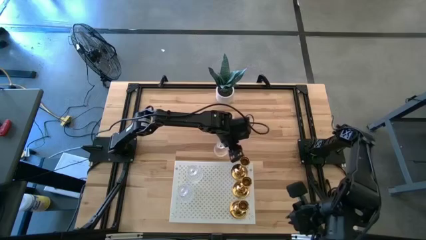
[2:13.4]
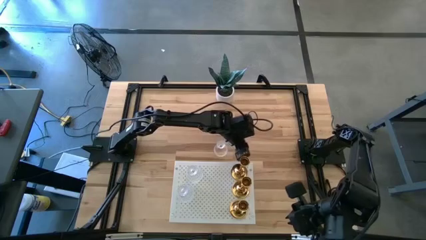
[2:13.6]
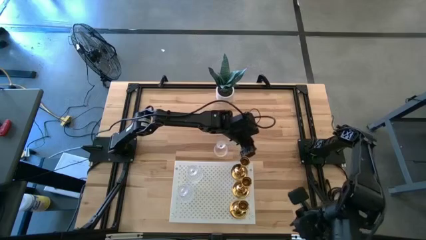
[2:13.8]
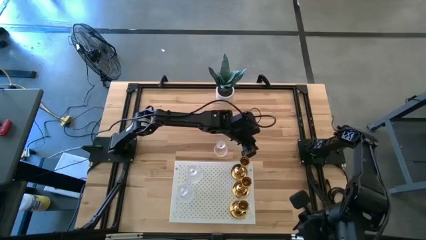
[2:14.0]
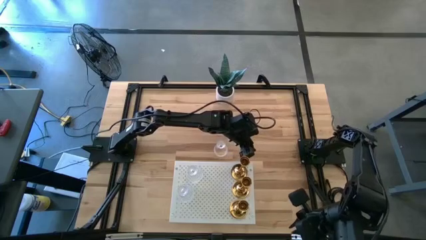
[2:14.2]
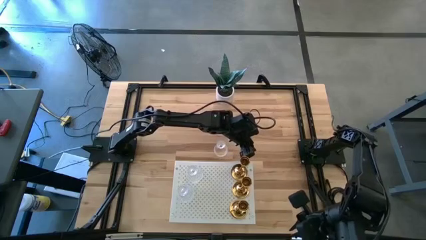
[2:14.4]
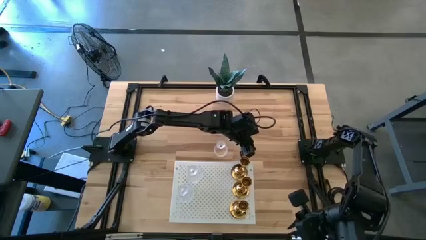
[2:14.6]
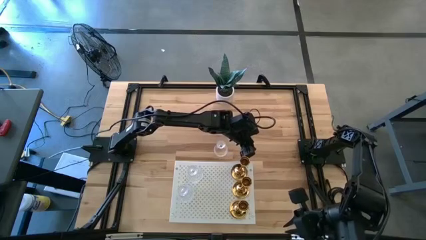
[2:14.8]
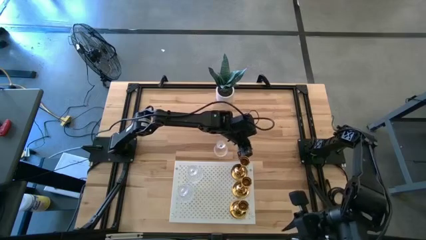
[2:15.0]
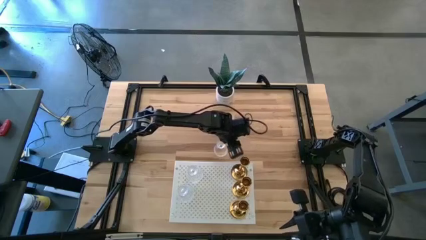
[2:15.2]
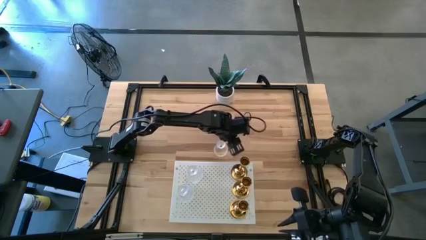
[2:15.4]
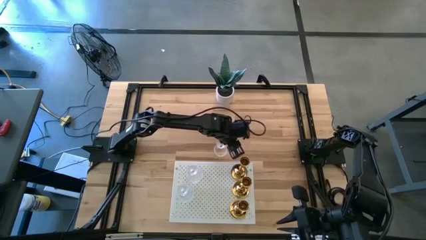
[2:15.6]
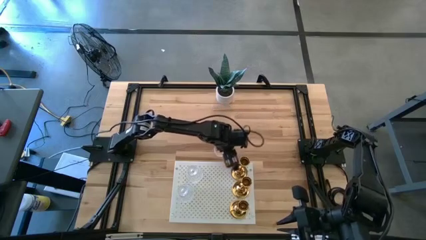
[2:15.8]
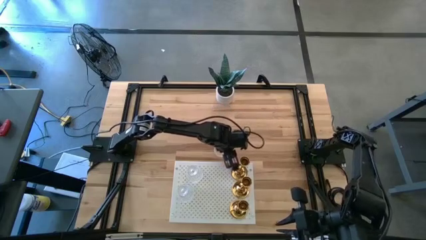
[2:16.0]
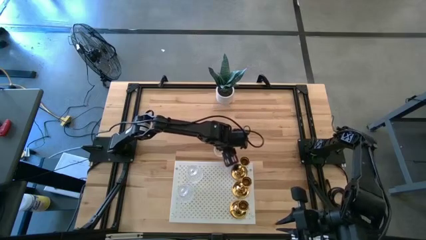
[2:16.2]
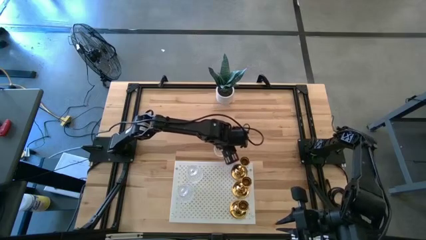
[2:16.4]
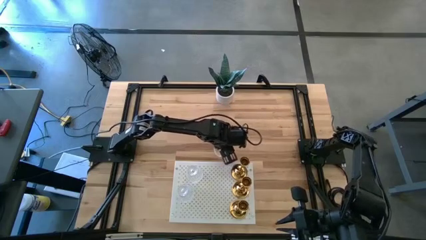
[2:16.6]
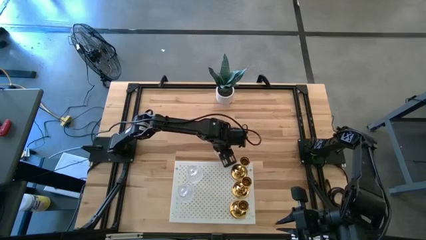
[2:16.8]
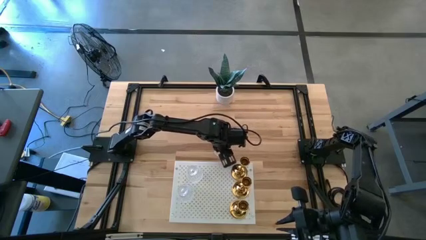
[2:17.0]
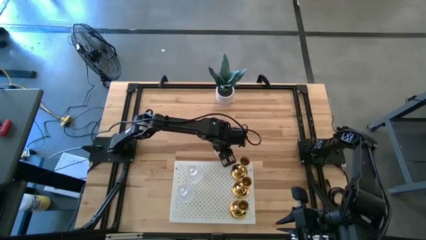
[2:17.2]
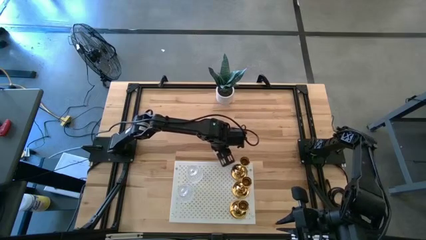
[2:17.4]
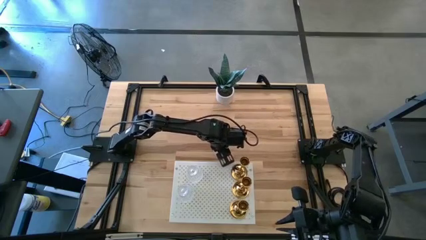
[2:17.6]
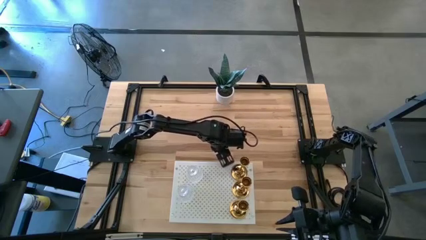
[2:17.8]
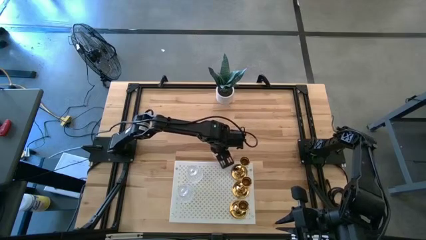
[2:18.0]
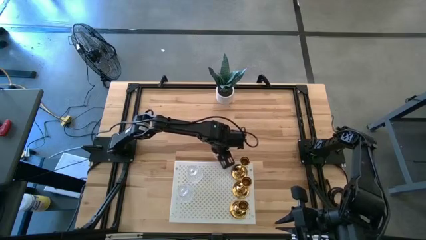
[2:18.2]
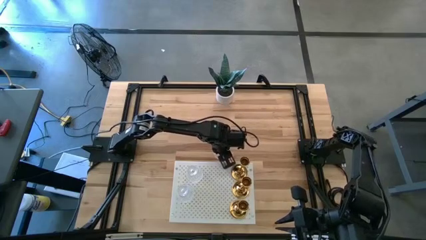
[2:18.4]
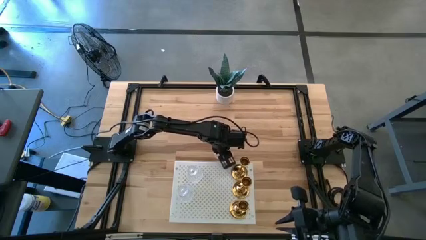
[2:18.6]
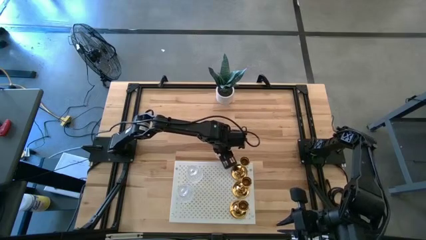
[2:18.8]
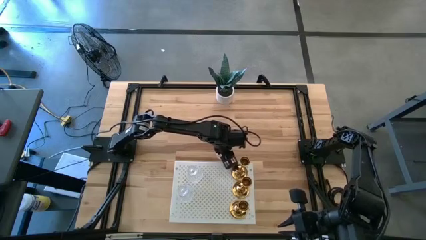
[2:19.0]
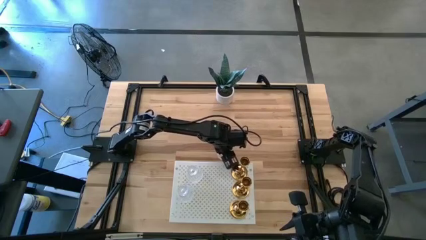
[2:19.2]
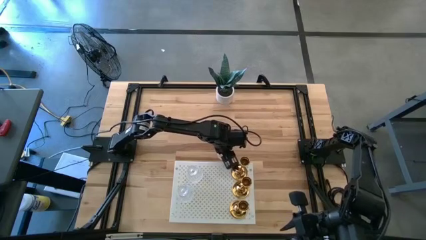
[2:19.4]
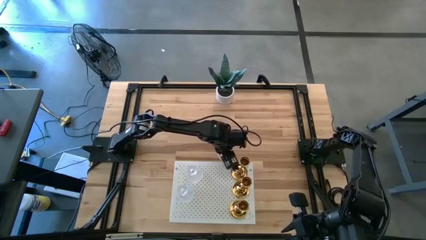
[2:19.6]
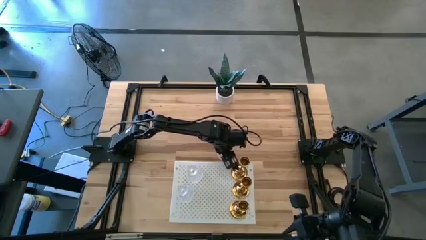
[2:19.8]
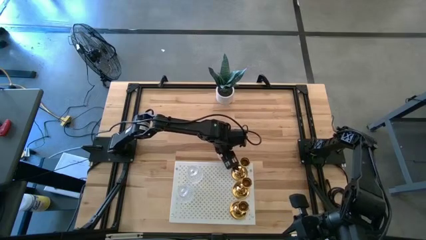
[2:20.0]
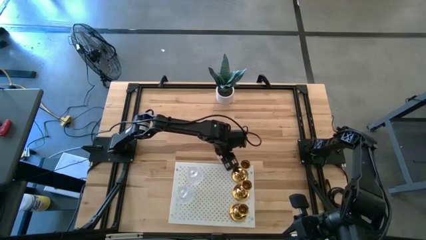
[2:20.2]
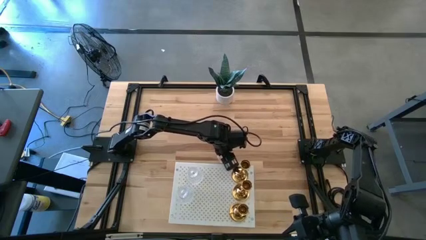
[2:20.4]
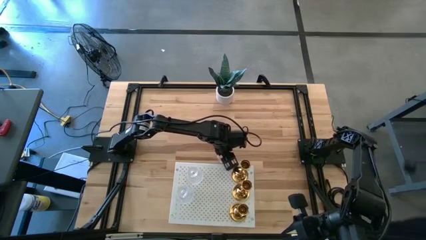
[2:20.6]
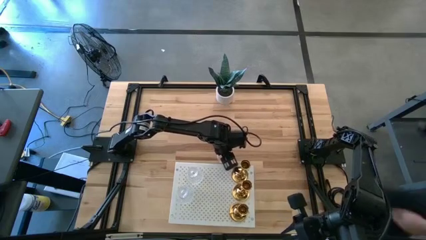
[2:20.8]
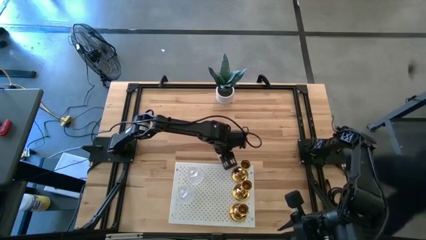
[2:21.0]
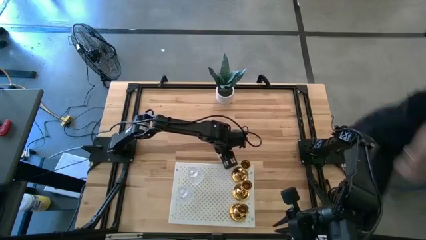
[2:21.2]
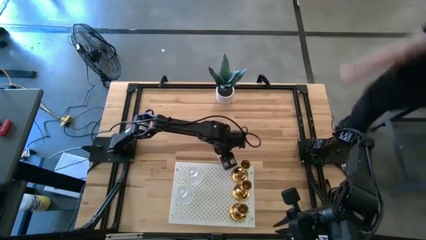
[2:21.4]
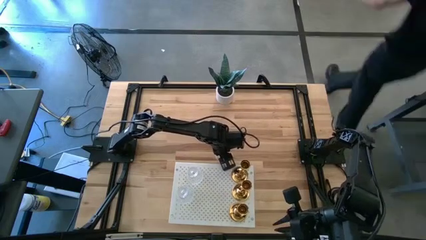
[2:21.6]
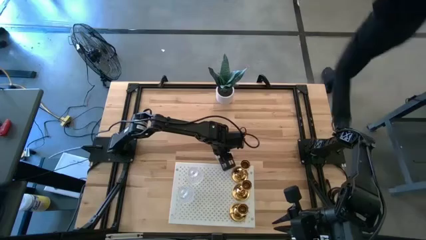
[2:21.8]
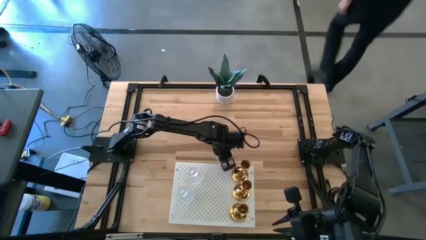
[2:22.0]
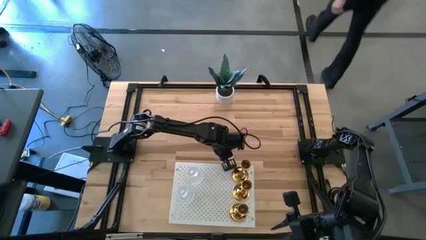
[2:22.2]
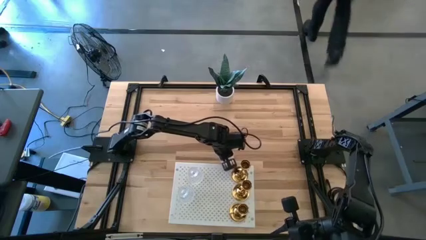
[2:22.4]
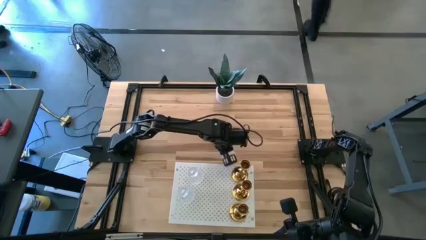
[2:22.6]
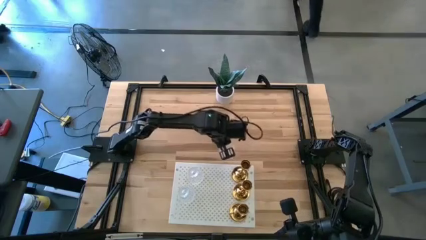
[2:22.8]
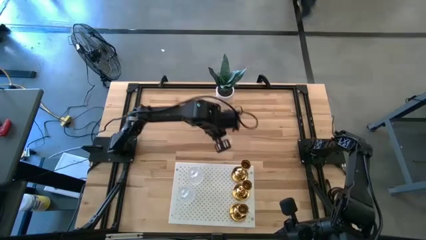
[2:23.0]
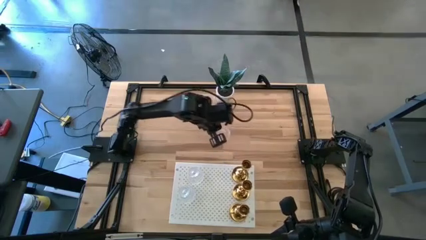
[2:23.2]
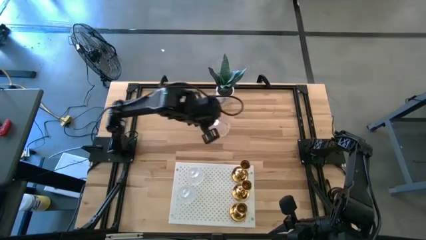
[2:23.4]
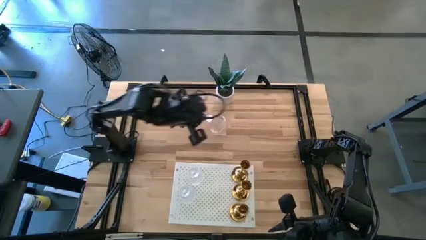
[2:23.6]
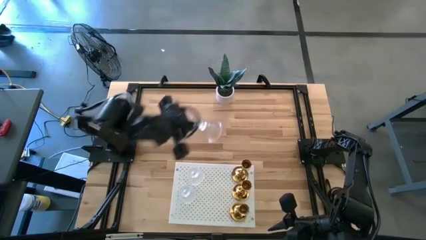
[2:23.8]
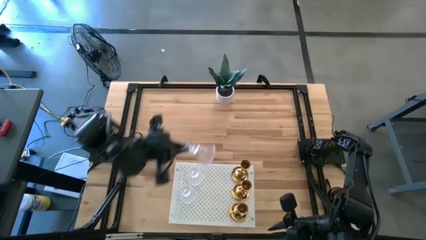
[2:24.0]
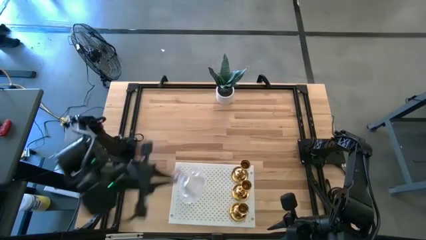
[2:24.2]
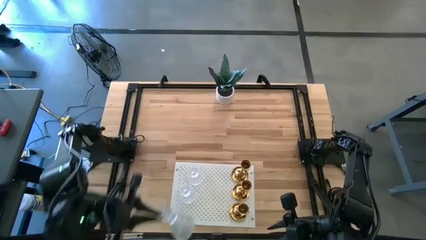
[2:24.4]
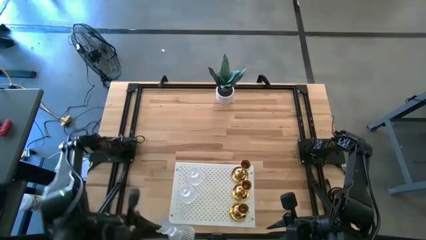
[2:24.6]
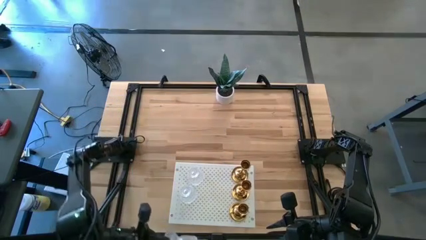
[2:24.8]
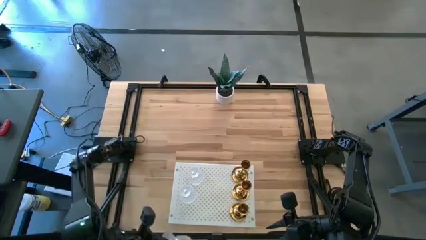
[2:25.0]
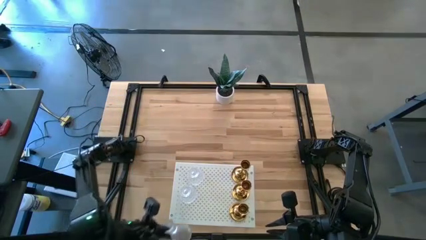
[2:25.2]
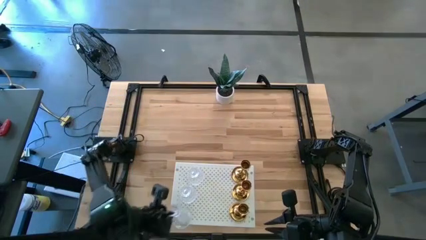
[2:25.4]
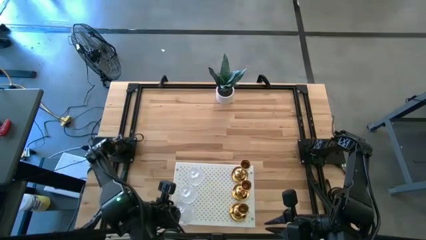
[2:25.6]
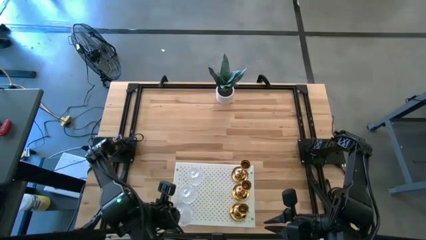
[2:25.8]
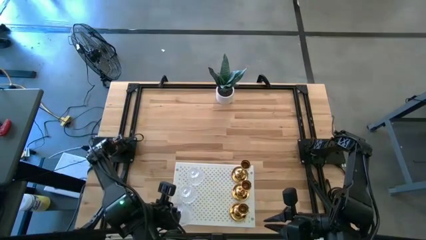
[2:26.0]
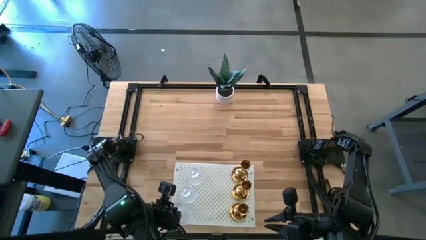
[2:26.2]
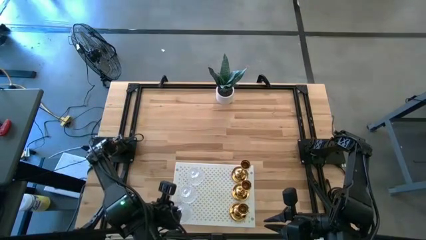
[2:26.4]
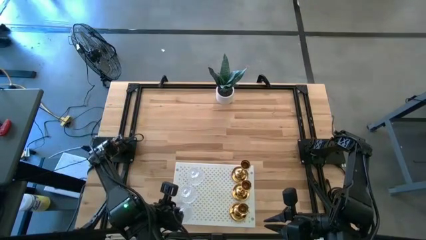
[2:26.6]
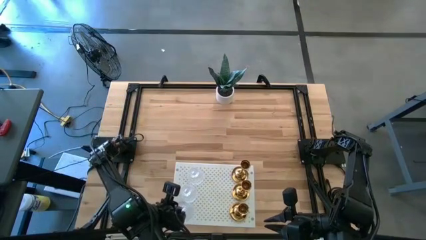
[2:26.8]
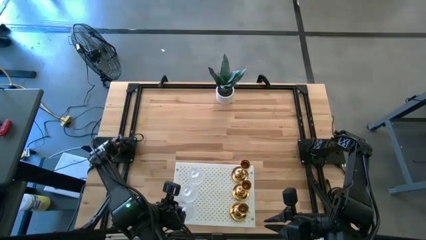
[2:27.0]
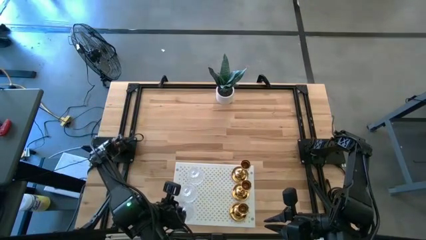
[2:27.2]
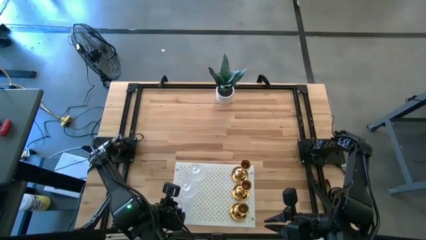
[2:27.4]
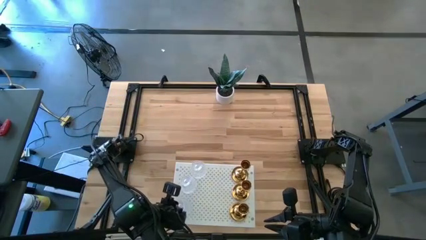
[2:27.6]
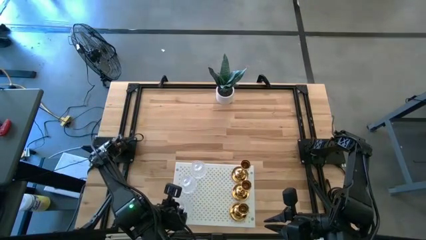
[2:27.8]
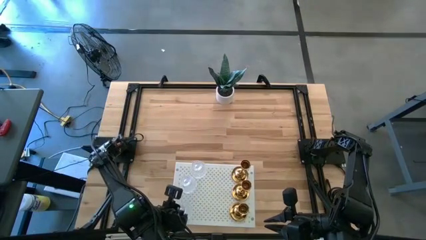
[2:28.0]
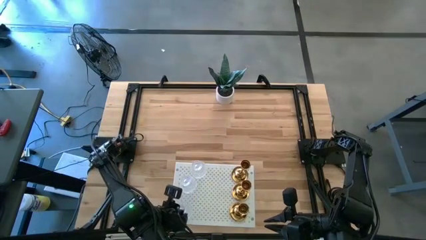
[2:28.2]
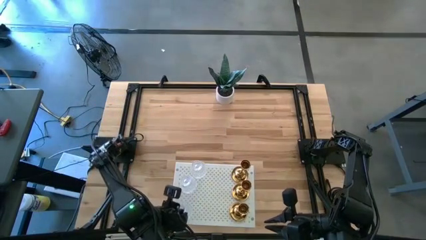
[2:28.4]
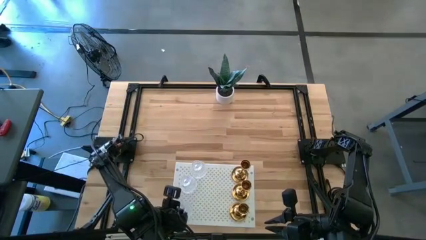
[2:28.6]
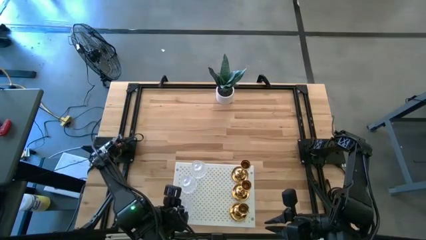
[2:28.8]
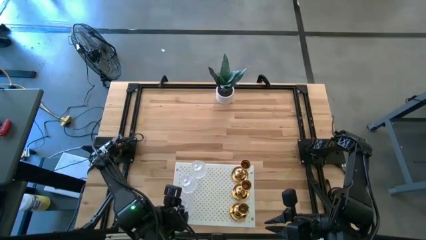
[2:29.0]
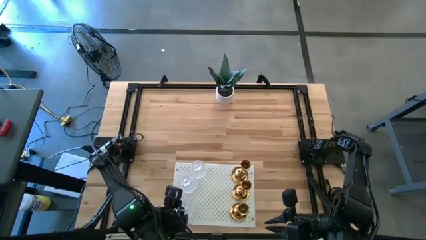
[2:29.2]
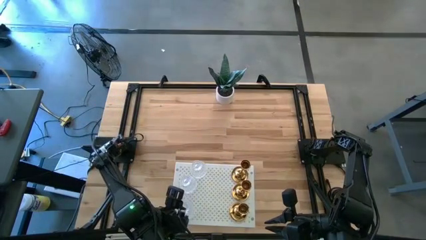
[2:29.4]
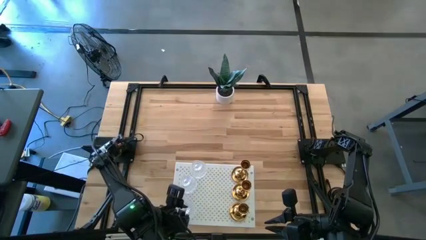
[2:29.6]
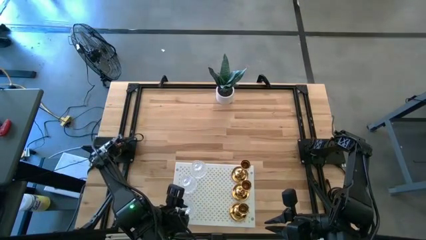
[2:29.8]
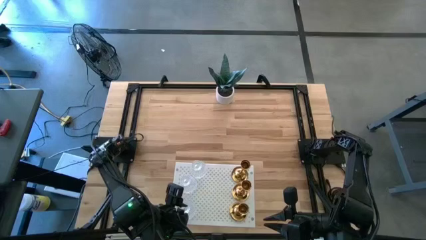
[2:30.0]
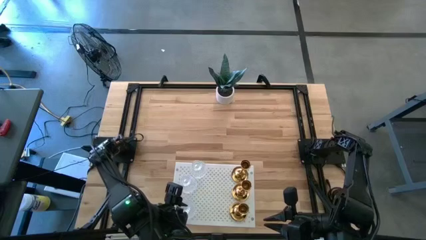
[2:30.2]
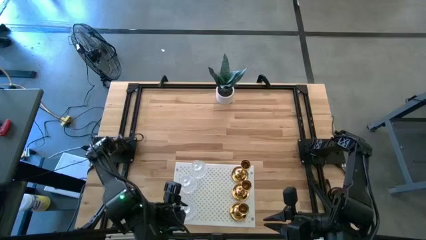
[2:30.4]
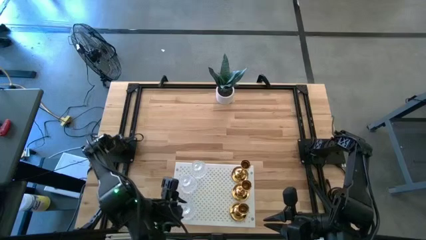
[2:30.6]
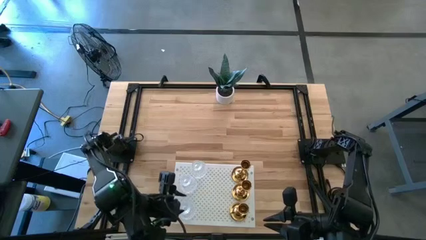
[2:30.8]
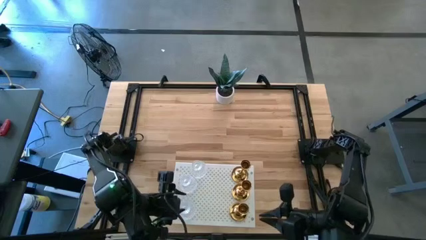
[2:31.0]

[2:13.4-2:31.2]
Task: Pick & Place candle stick holders
Put the glass candle holder on the shelf
